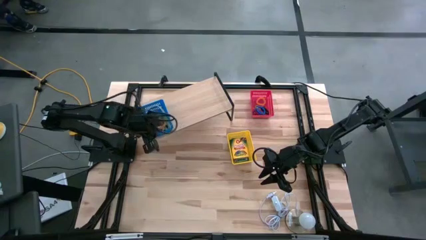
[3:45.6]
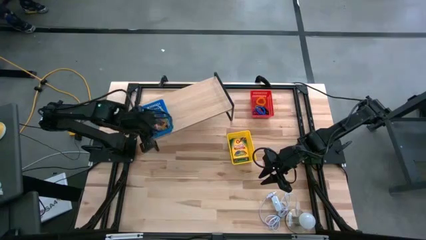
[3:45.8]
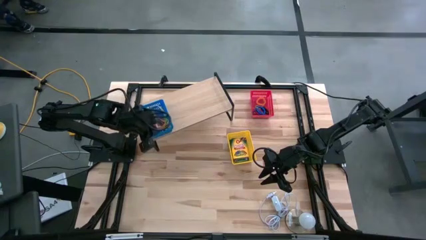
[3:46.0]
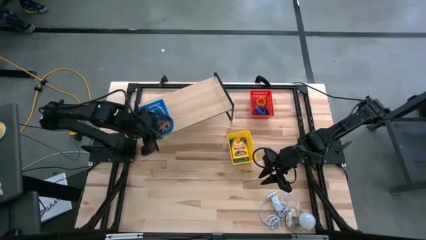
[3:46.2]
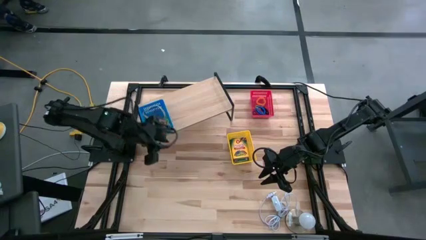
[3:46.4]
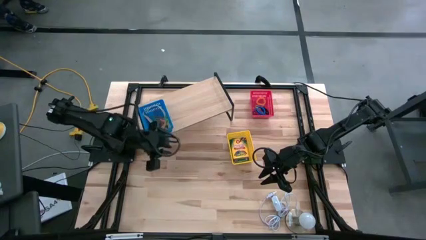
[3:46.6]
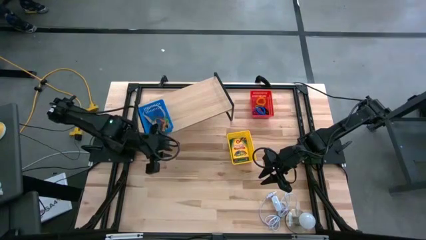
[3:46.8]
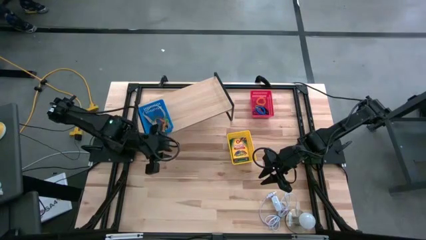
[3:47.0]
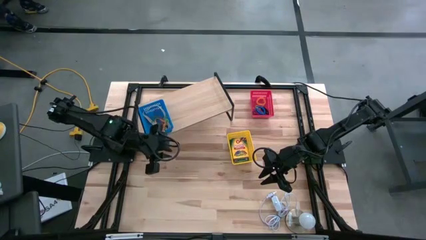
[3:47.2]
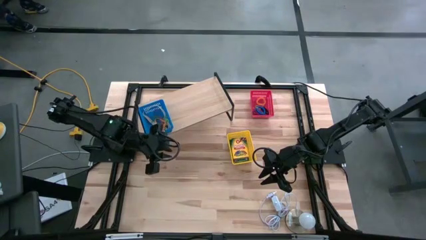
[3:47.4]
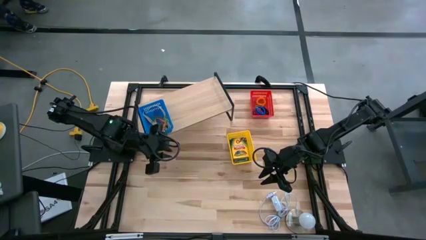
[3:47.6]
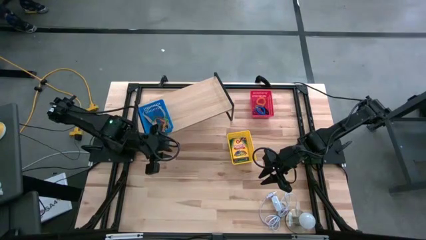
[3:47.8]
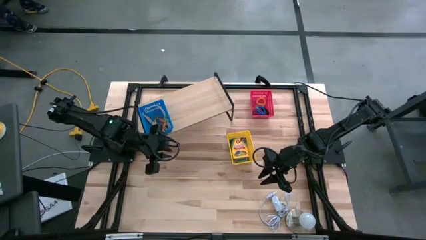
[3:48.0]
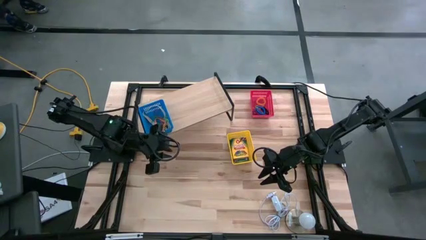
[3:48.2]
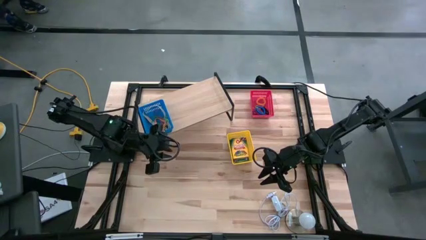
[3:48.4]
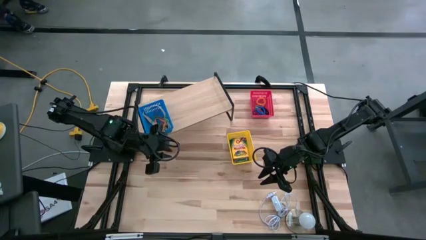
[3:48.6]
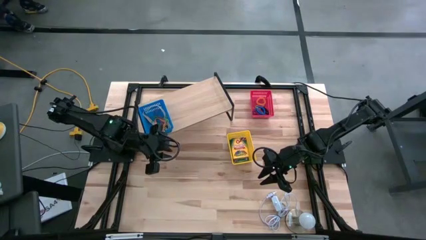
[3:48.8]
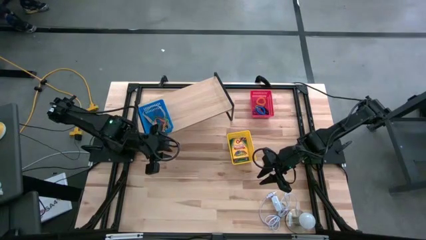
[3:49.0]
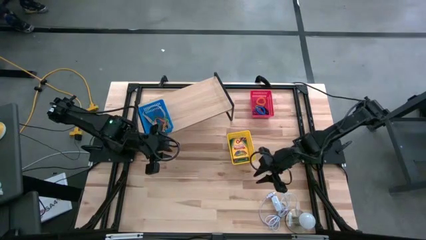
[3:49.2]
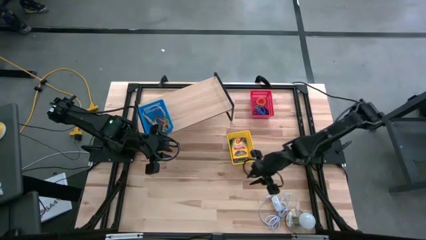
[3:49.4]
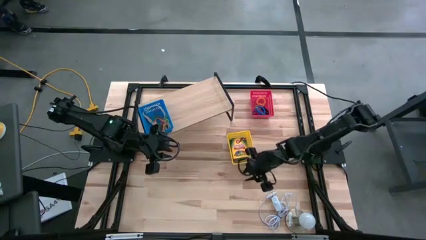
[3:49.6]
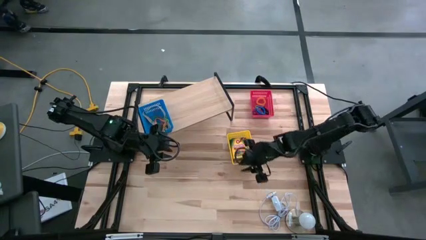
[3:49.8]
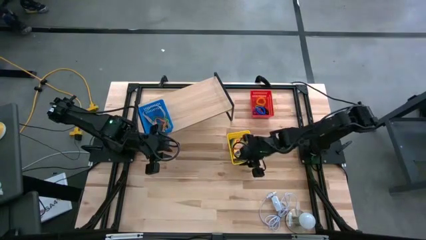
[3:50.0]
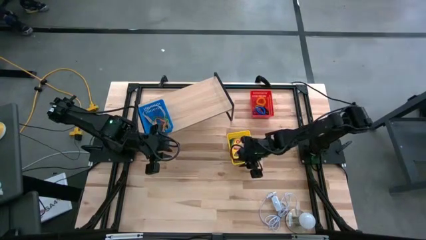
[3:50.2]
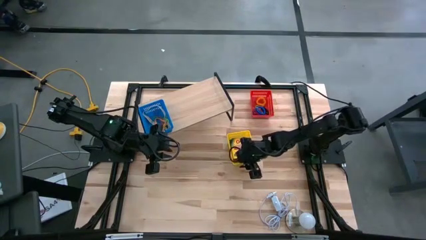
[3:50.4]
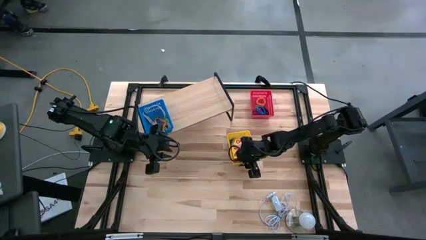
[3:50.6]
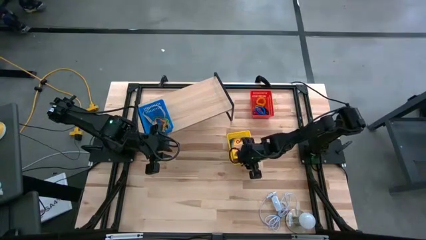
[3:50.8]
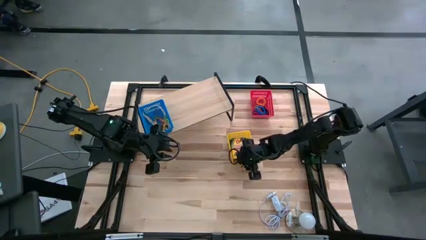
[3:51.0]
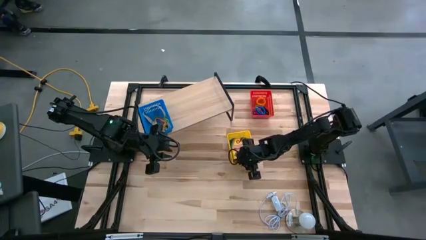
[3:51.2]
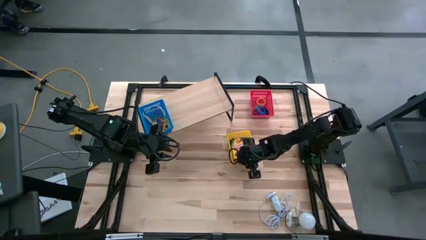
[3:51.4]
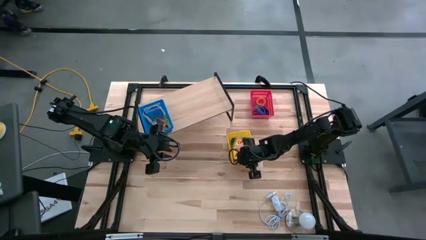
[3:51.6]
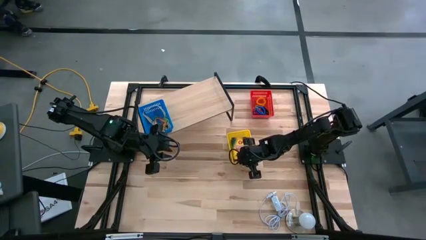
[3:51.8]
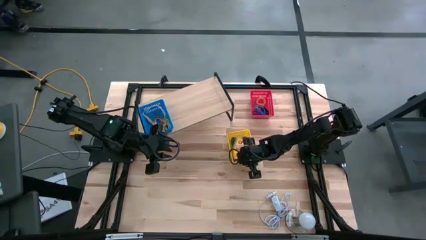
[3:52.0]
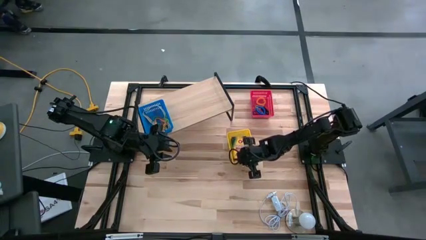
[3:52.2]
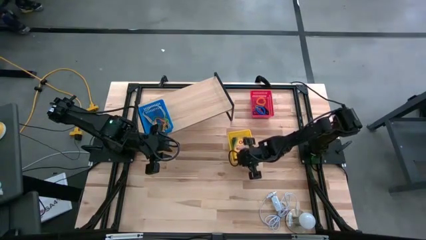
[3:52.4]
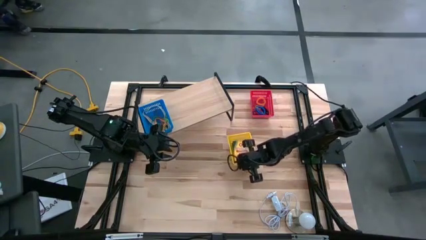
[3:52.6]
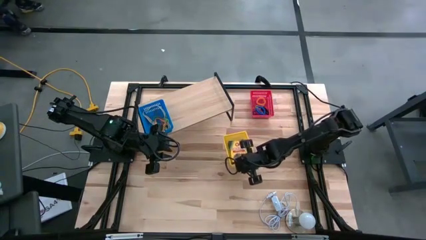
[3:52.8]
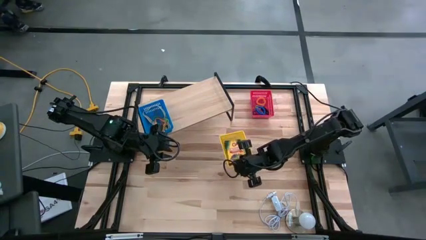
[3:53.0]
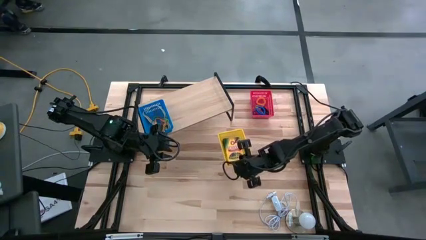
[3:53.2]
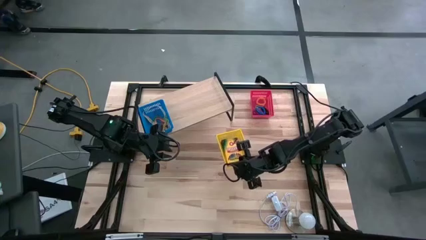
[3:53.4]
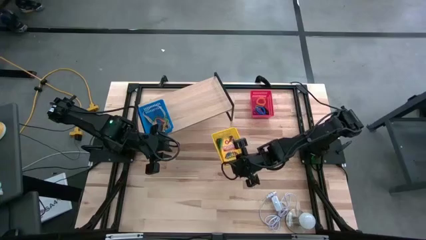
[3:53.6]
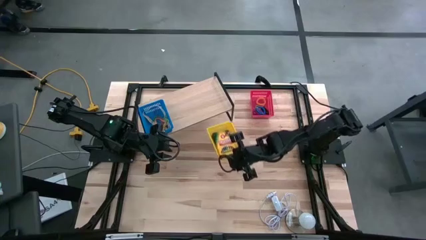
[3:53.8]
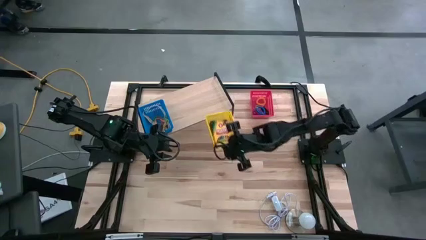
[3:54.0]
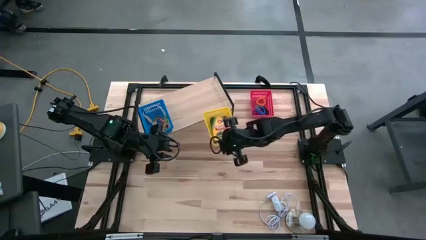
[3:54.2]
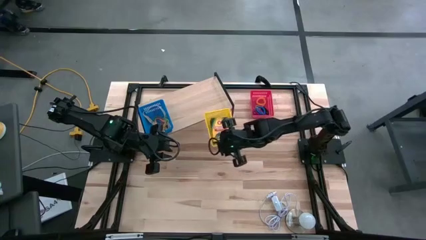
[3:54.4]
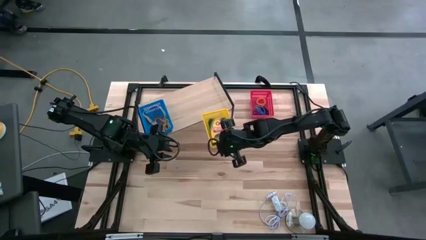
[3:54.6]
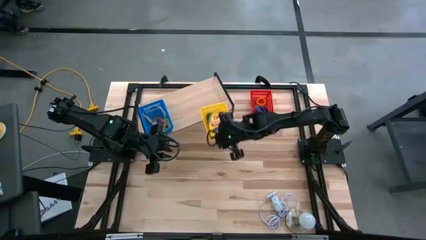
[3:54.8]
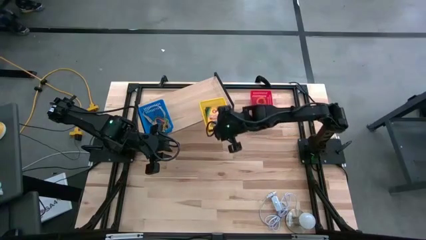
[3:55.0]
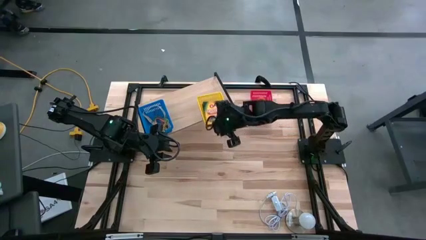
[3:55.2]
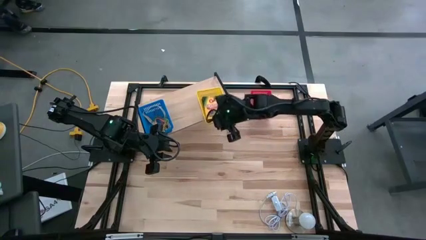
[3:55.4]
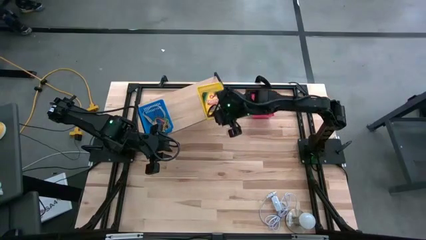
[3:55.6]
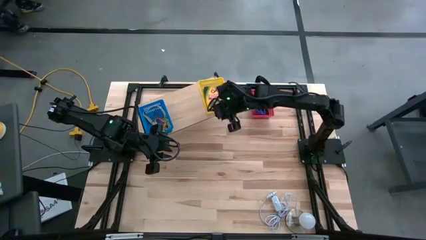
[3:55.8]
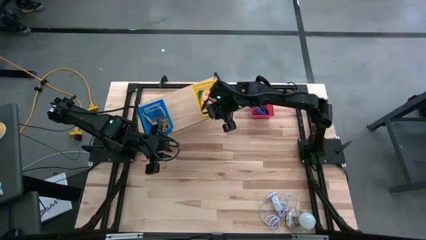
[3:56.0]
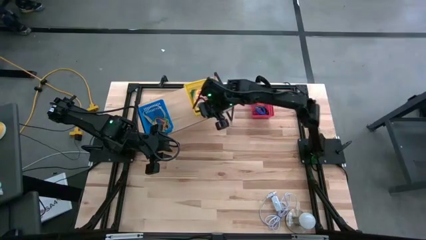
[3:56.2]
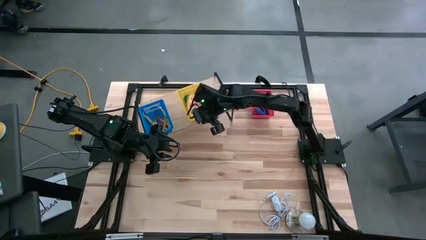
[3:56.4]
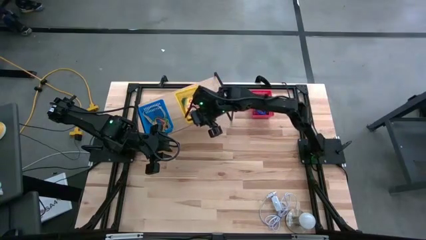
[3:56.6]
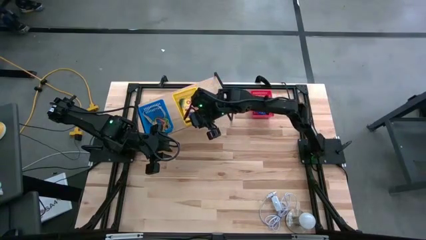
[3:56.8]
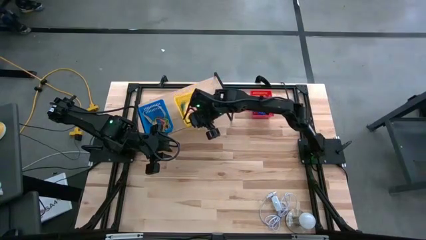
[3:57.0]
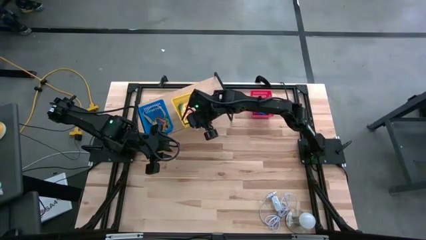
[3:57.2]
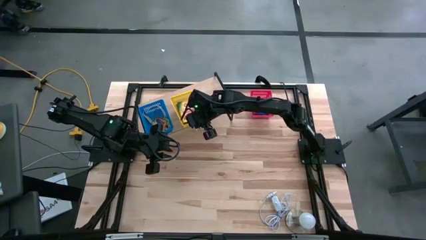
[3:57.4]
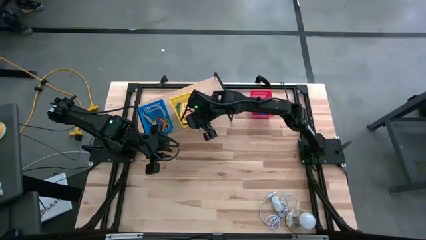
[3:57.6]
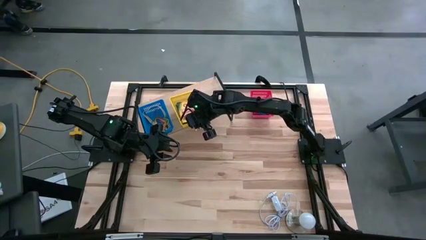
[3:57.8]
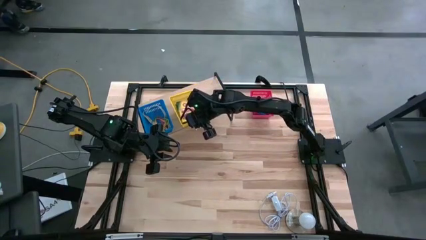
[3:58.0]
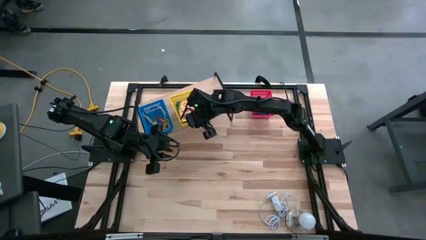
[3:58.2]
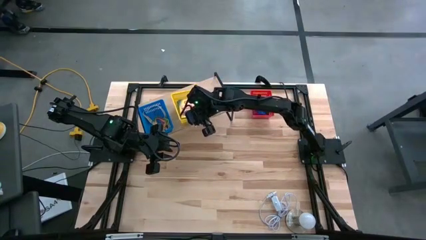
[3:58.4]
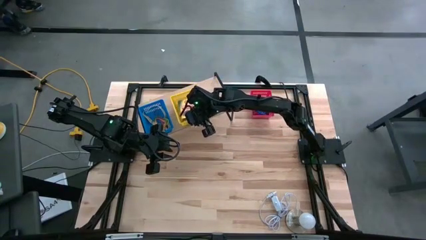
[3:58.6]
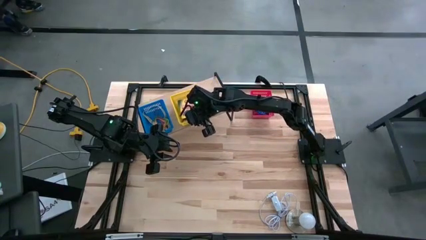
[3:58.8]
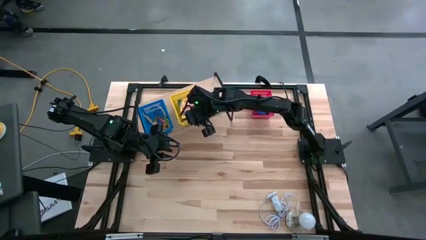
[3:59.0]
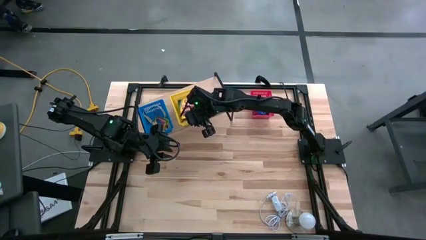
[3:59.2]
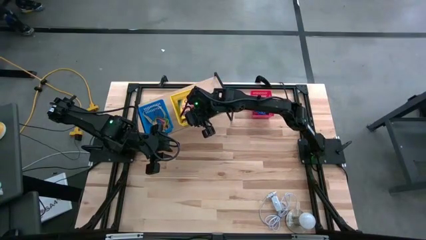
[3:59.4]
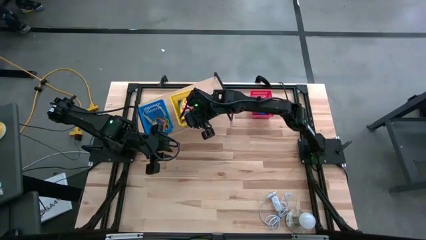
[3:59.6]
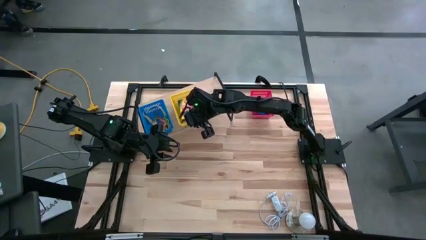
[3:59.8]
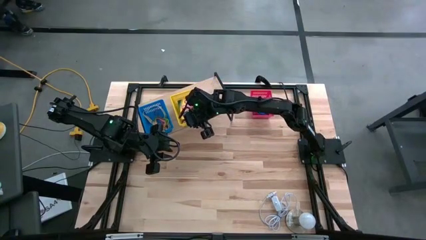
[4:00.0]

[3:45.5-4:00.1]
Task: Pick & Place Office Desk Supplies
Put the yellow bin with crayon boxes on the shelf
